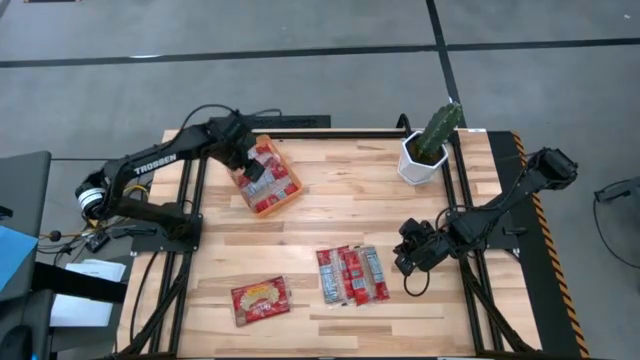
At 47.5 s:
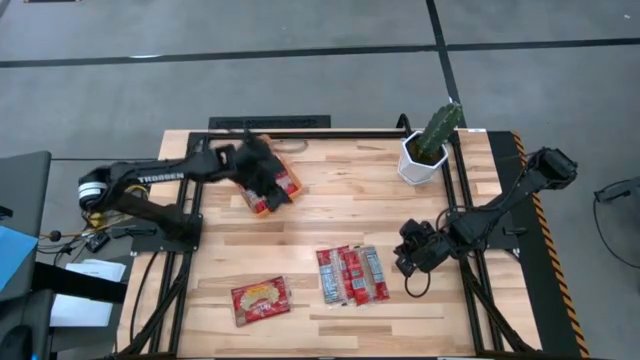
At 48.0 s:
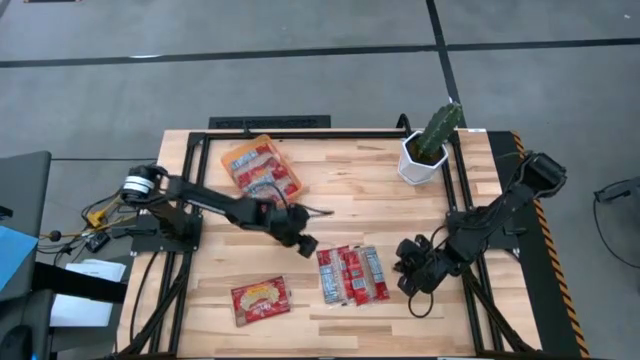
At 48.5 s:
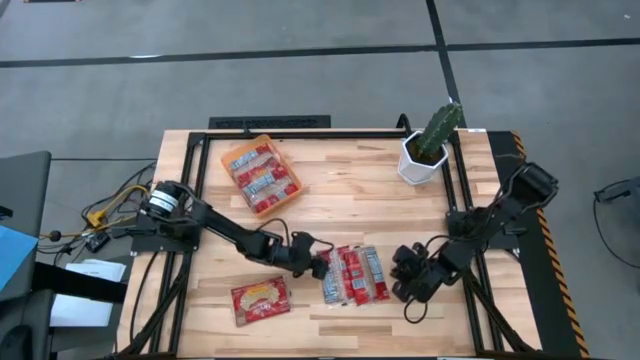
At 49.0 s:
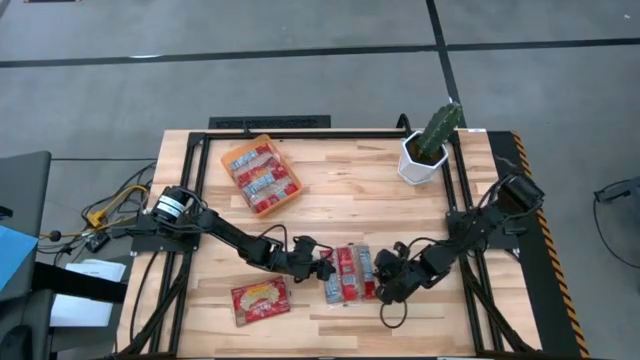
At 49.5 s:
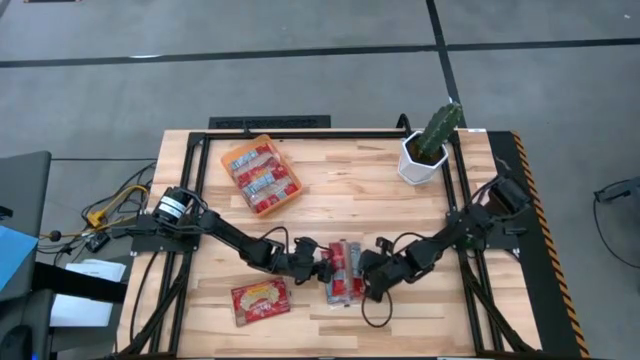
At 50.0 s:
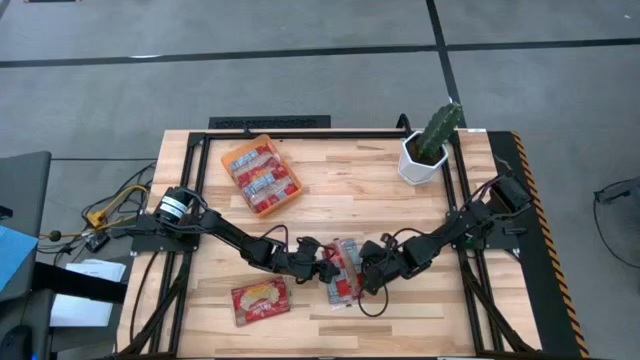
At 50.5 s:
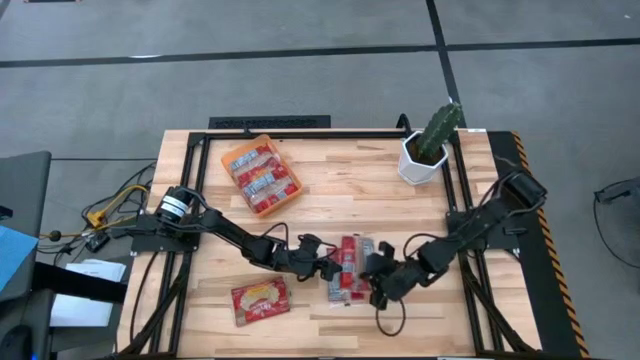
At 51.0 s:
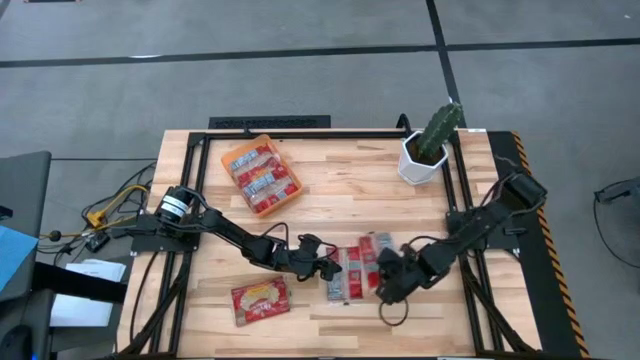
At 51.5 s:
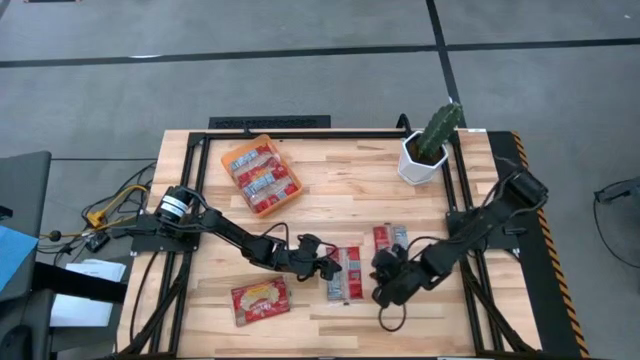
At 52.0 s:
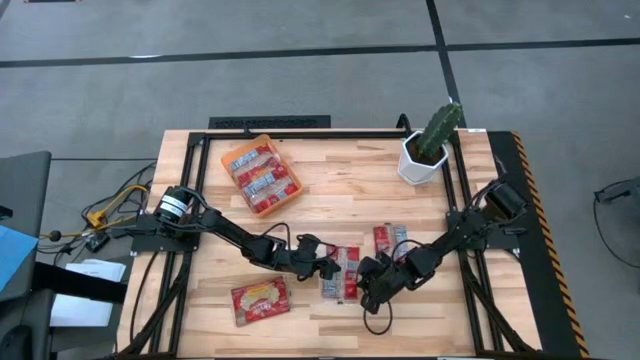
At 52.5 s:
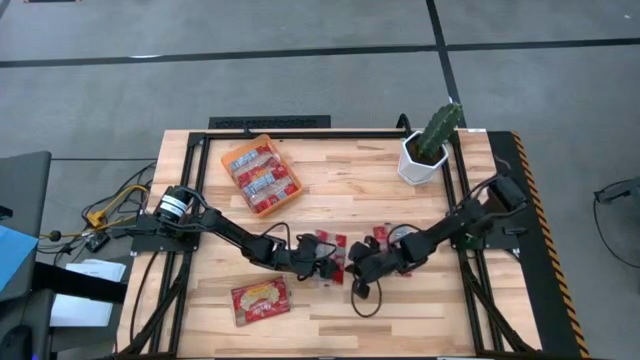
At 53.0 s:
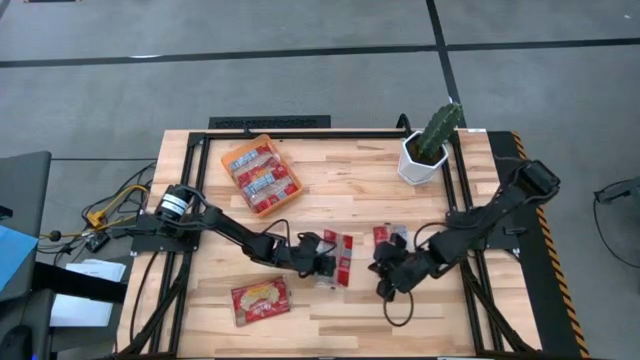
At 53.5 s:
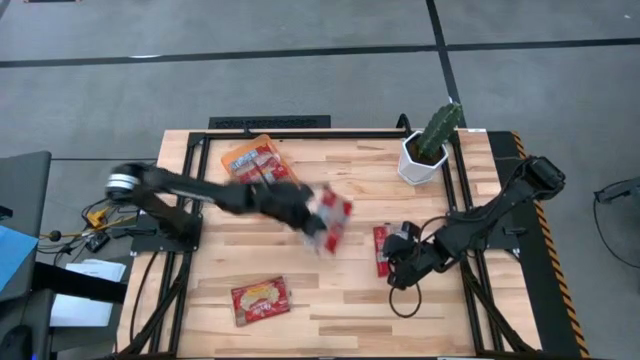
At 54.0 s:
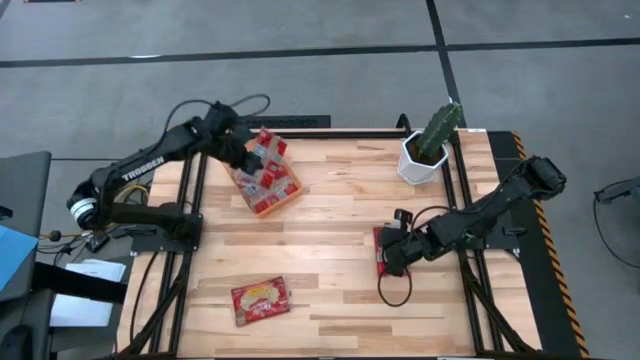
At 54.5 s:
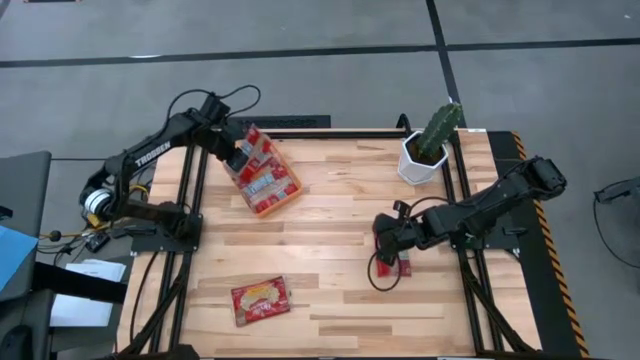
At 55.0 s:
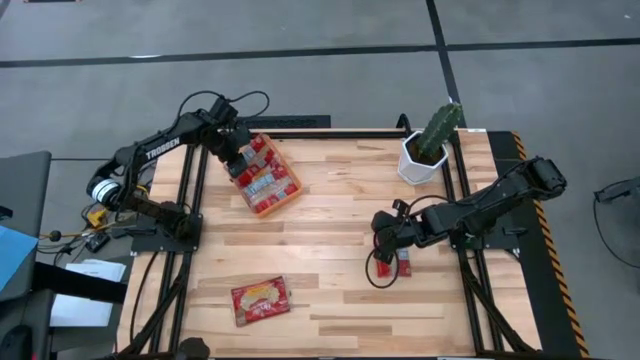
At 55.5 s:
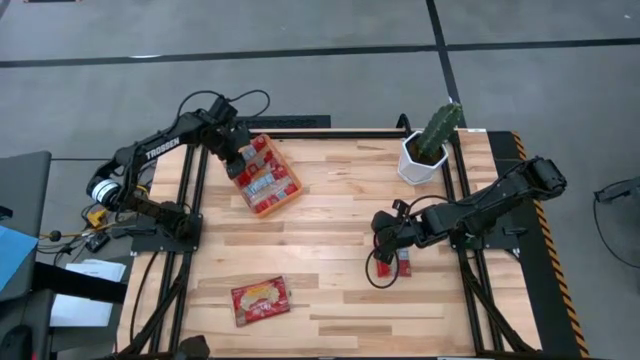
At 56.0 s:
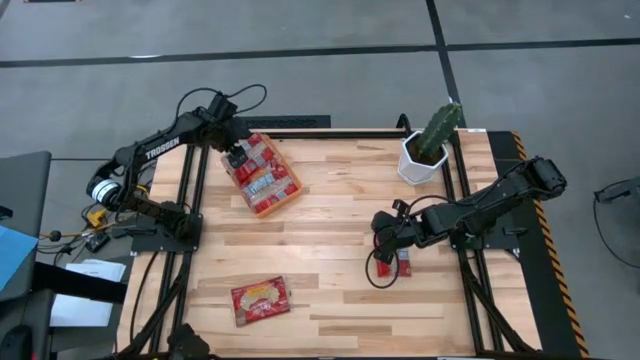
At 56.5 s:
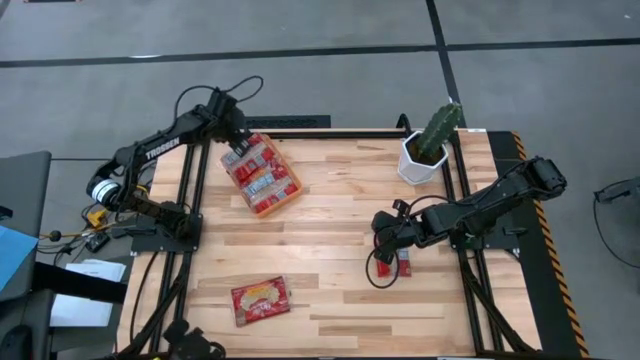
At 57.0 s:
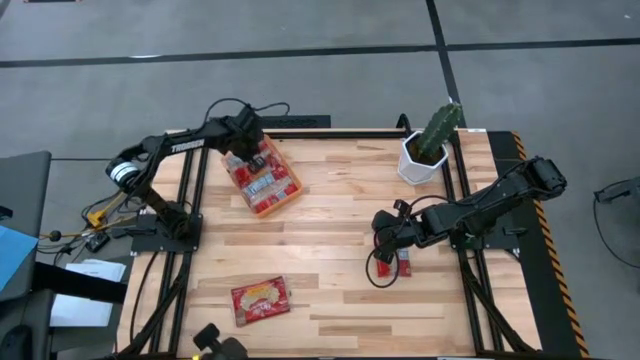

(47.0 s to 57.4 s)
Task: Sort popcorn bags into baskets
Put the red popcorn bag into the orange bin

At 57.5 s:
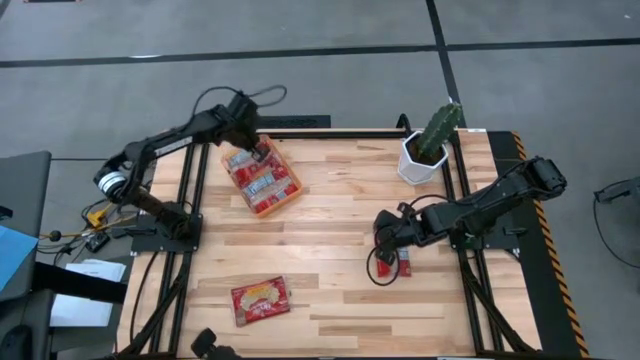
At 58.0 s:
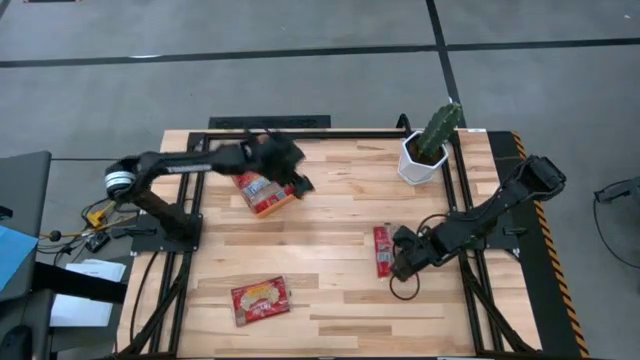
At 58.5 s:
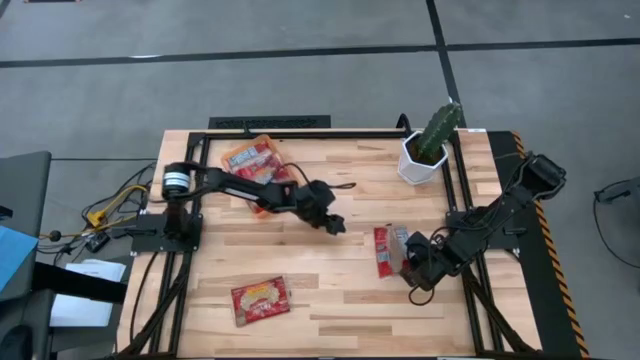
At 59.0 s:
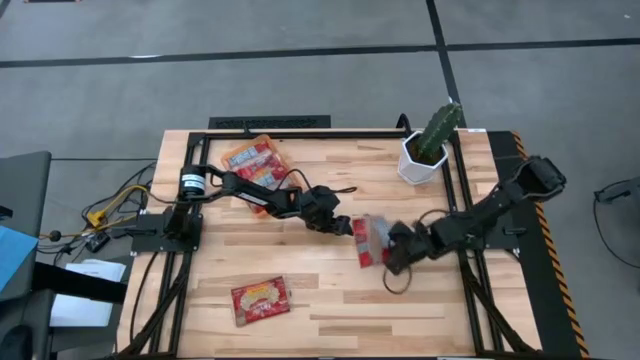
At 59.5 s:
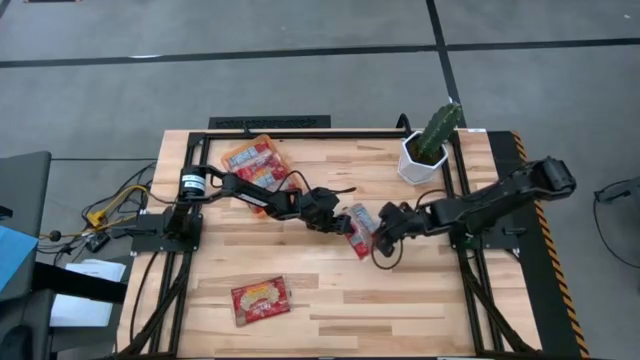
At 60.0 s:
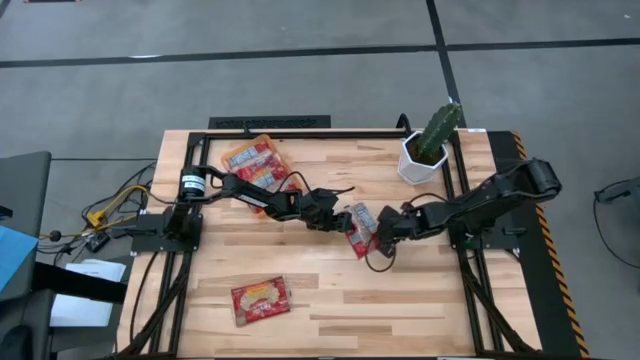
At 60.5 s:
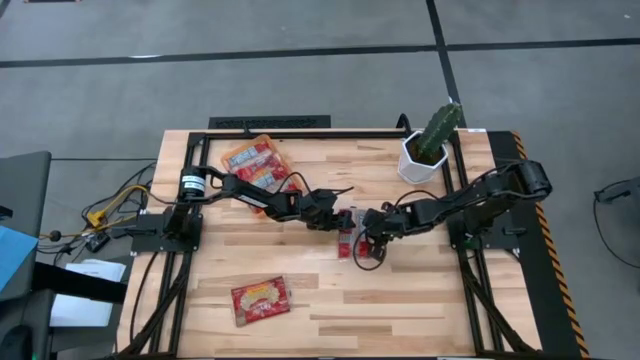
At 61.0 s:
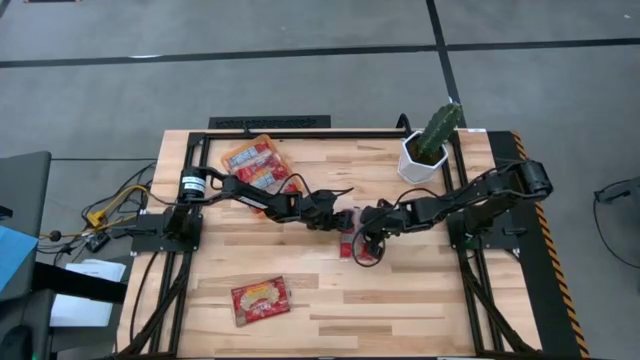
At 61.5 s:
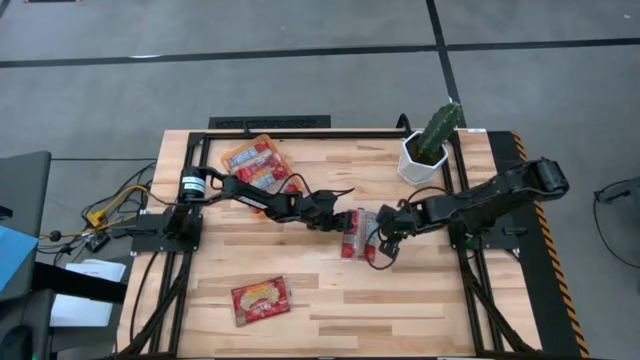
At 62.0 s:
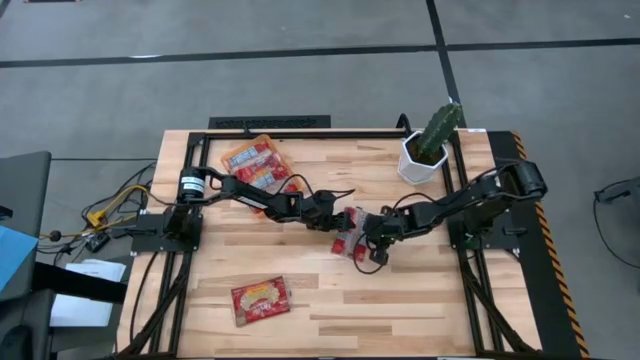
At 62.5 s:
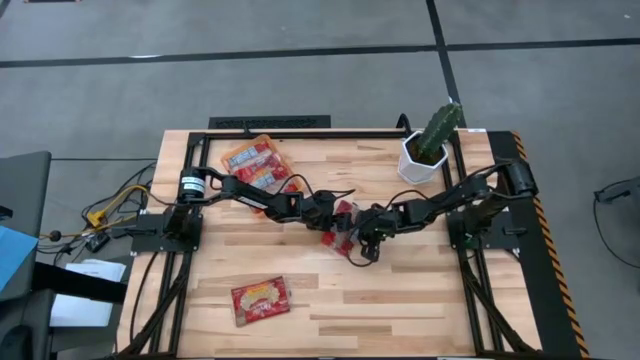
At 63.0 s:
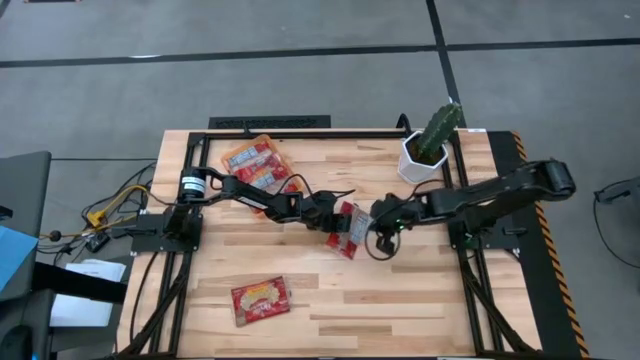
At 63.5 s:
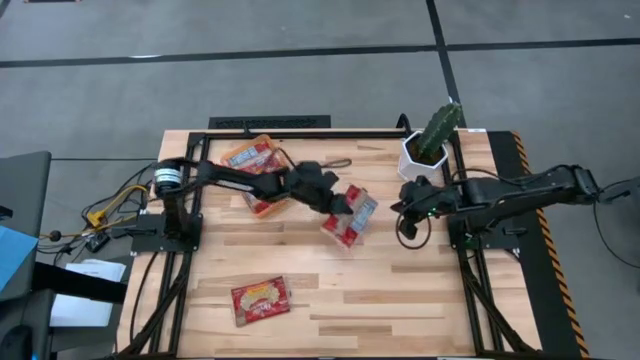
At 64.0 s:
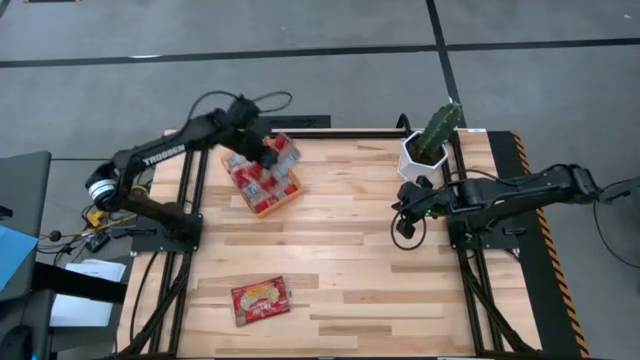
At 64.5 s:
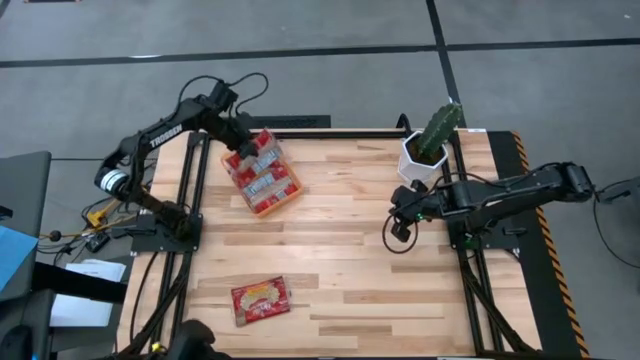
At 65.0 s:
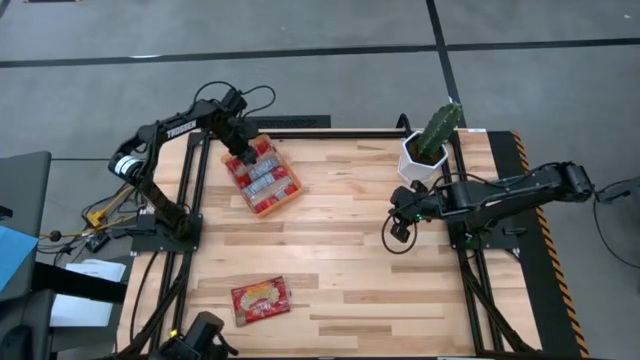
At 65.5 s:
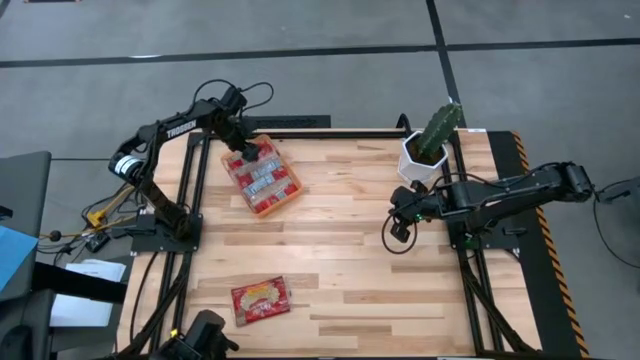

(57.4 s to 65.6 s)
Put the red popcorn bag into the orange bin

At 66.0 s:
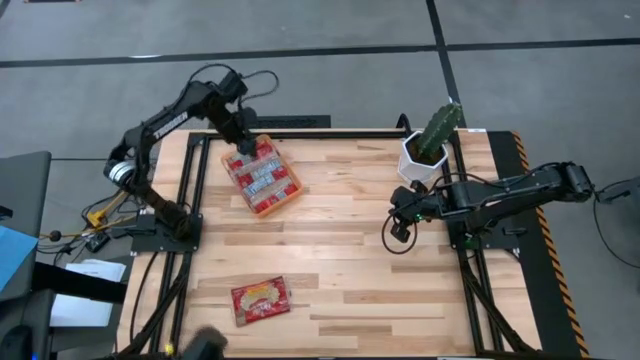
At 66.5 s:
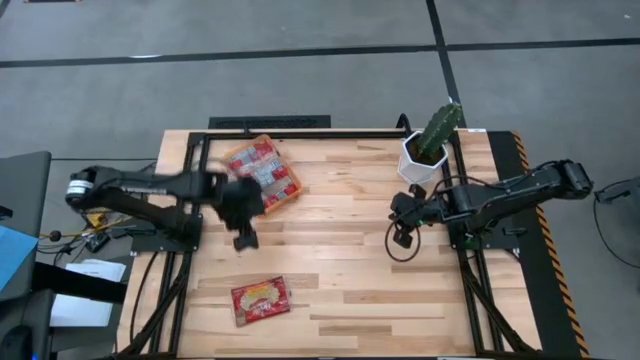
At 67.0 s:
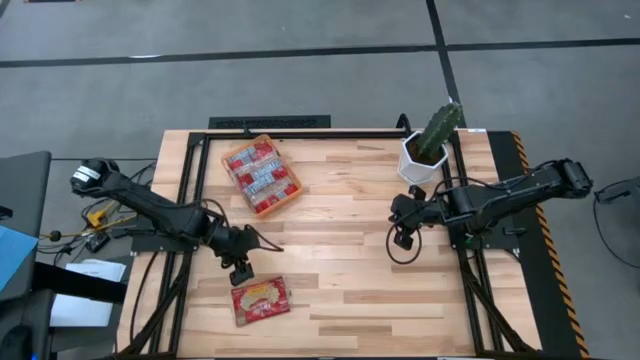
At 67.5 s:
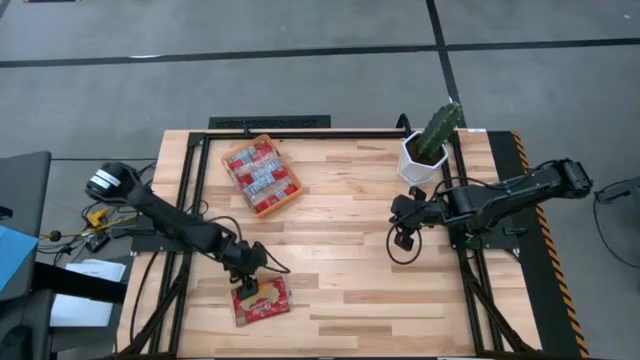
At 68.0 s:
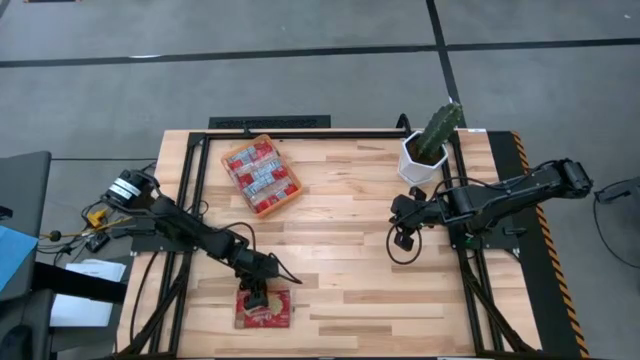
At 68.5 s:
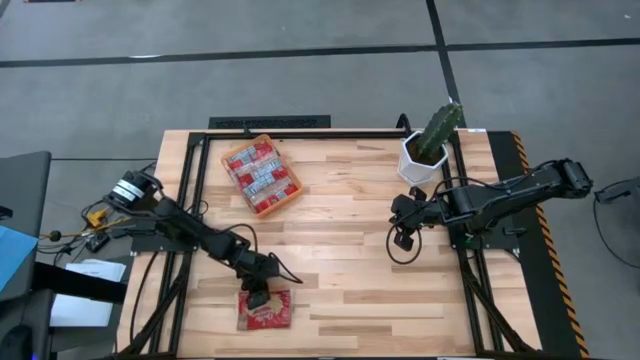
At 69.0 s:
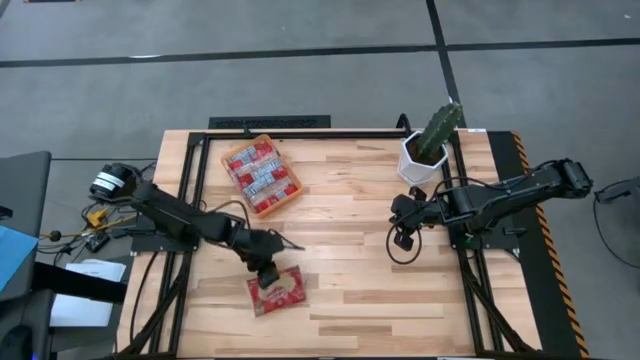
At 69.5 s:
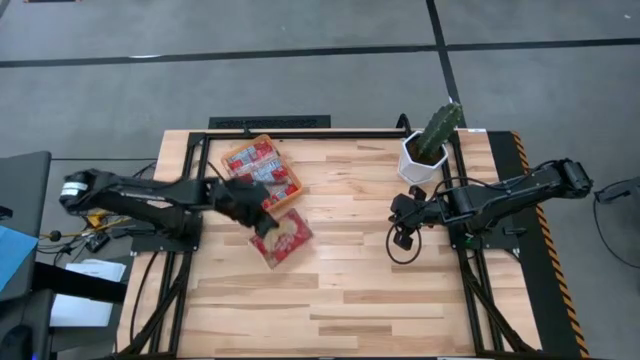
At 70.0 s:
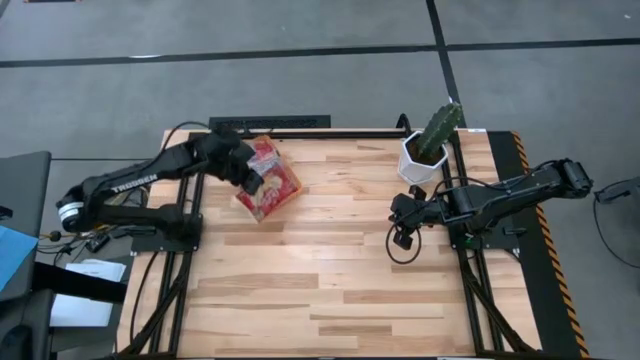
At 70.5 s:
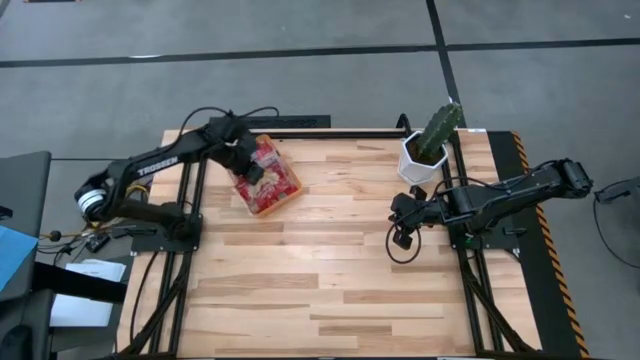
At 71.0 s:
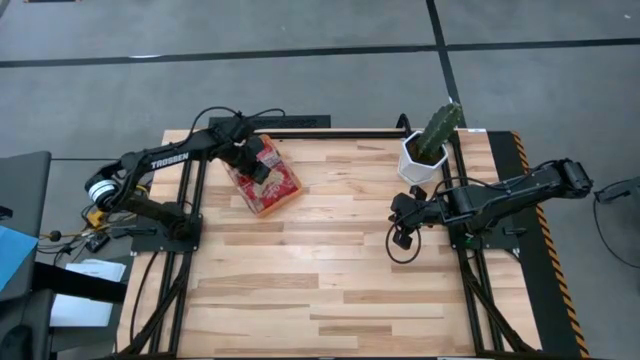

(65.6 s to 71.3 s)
Put the red popcorn bag into the orange bin
